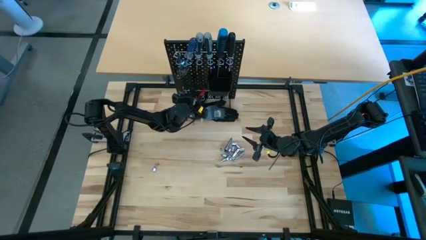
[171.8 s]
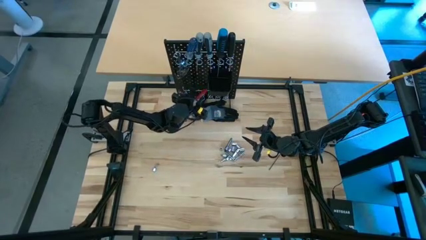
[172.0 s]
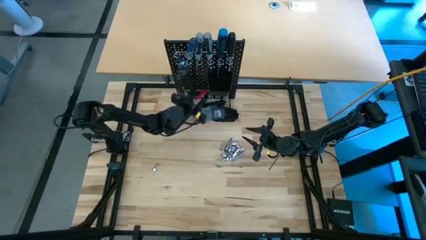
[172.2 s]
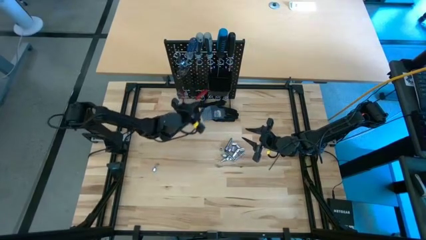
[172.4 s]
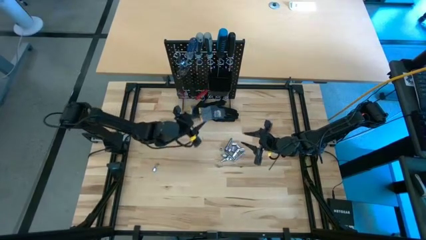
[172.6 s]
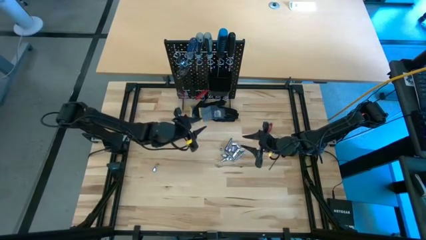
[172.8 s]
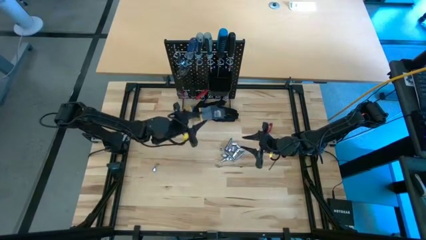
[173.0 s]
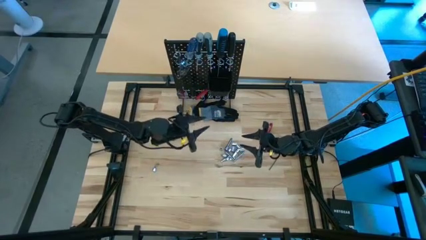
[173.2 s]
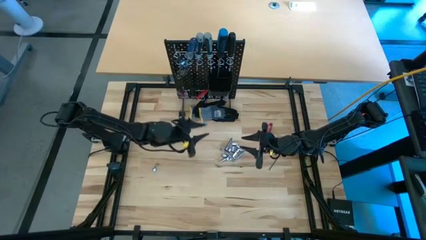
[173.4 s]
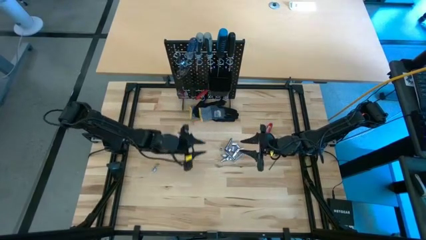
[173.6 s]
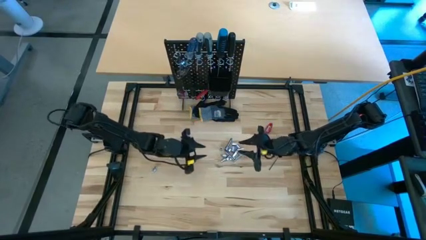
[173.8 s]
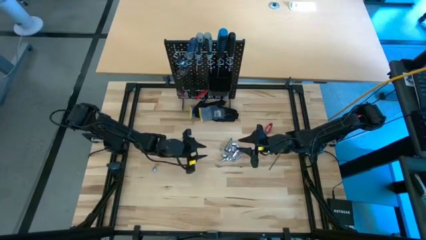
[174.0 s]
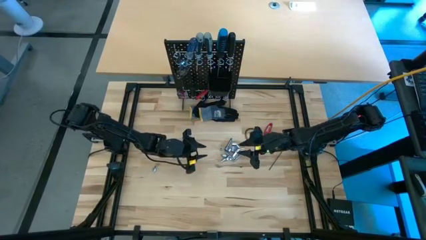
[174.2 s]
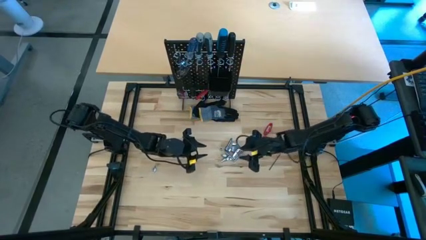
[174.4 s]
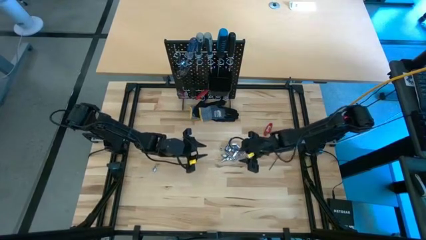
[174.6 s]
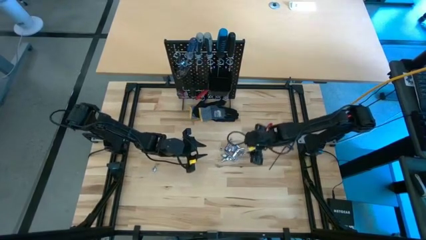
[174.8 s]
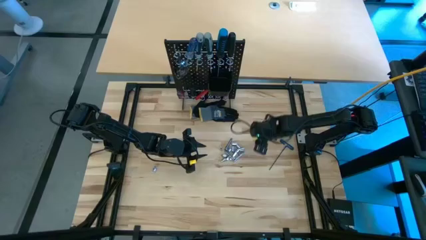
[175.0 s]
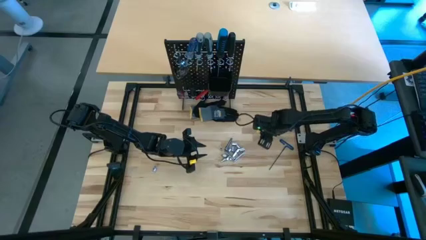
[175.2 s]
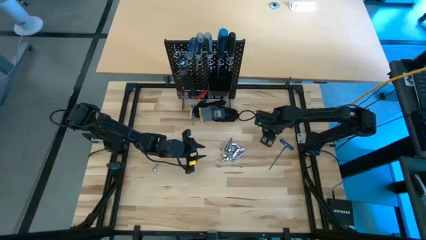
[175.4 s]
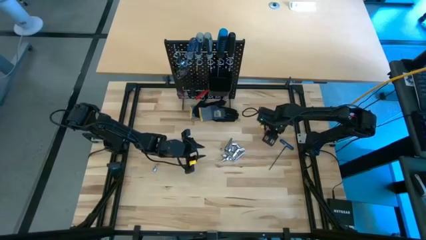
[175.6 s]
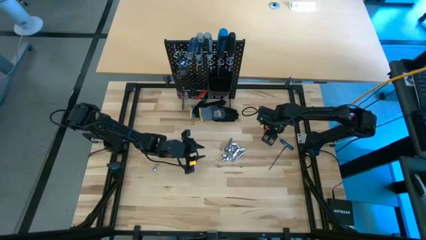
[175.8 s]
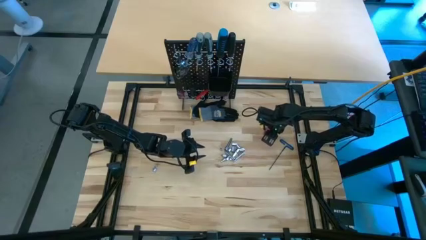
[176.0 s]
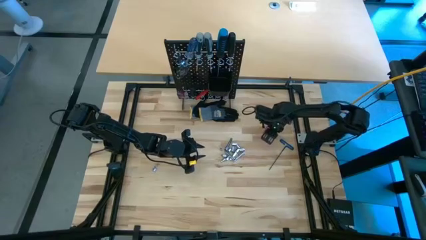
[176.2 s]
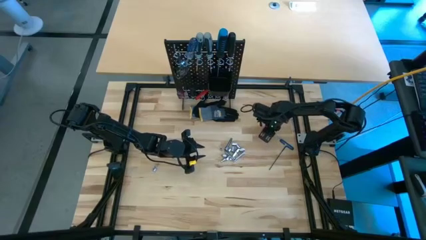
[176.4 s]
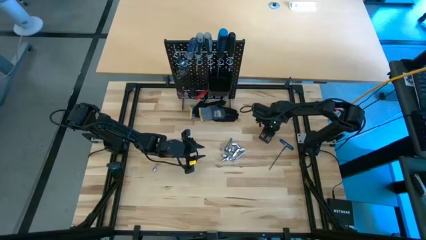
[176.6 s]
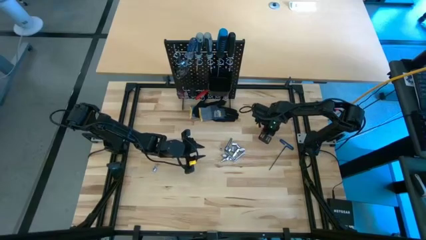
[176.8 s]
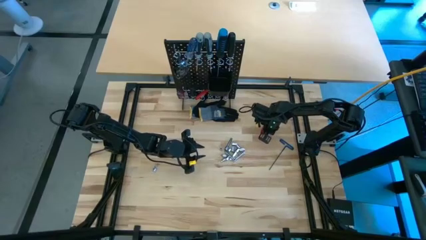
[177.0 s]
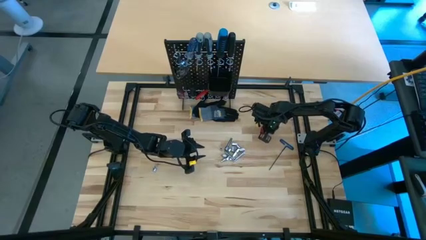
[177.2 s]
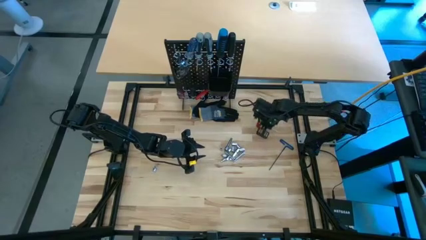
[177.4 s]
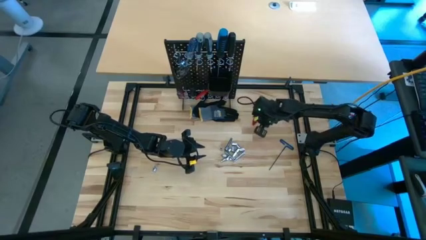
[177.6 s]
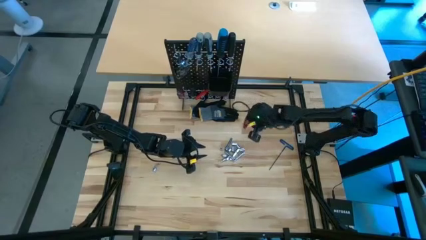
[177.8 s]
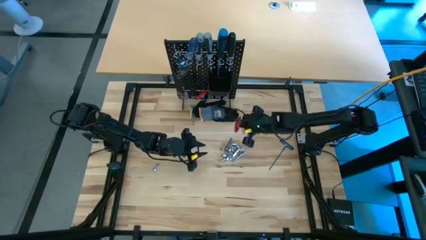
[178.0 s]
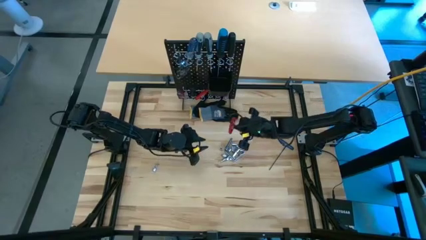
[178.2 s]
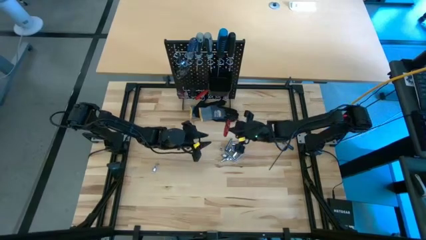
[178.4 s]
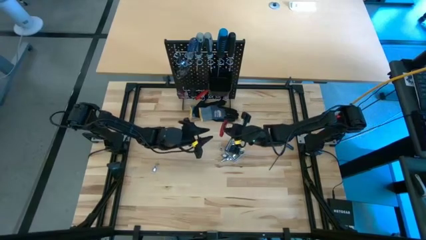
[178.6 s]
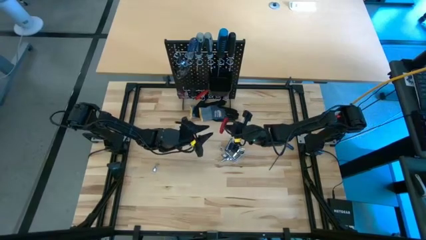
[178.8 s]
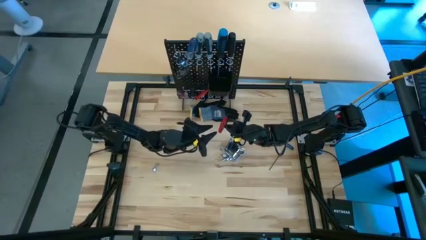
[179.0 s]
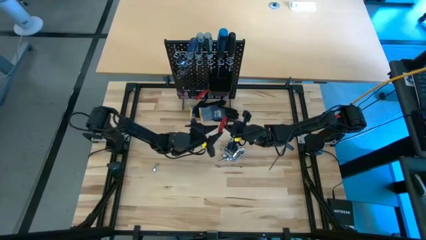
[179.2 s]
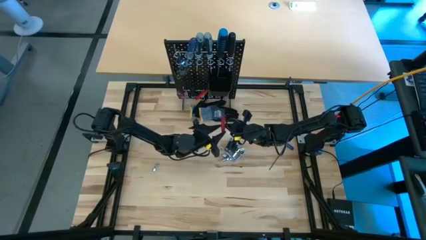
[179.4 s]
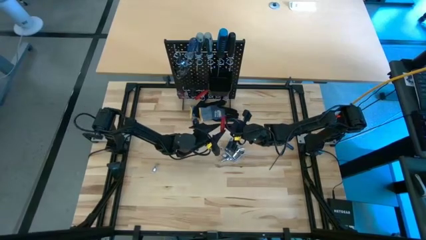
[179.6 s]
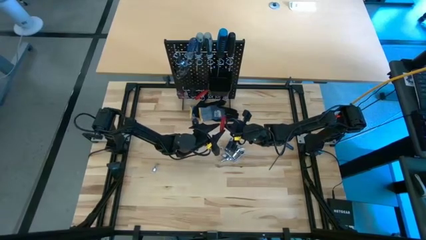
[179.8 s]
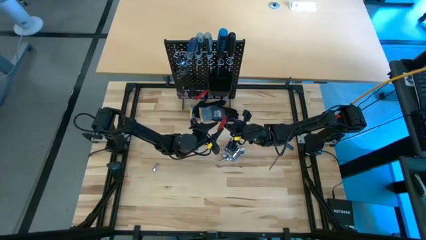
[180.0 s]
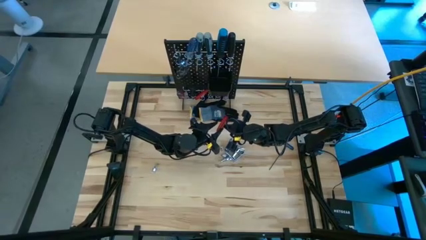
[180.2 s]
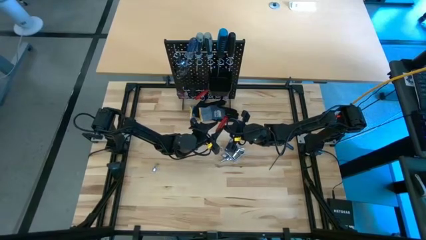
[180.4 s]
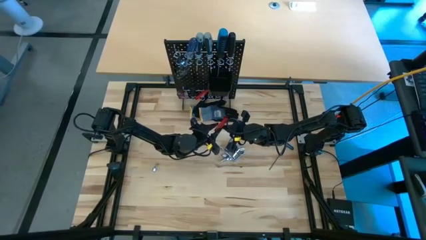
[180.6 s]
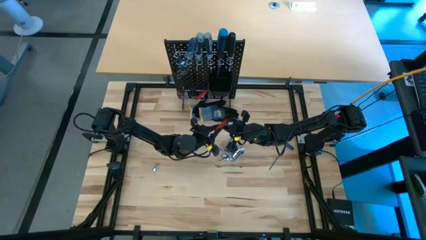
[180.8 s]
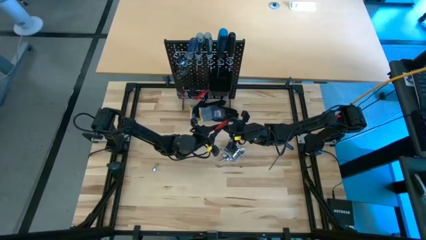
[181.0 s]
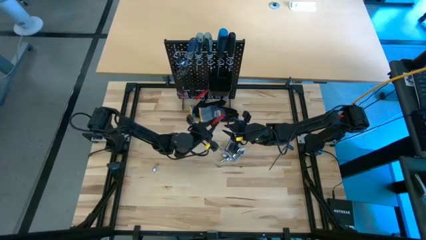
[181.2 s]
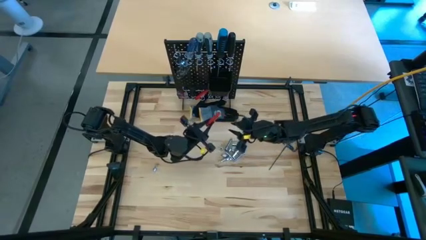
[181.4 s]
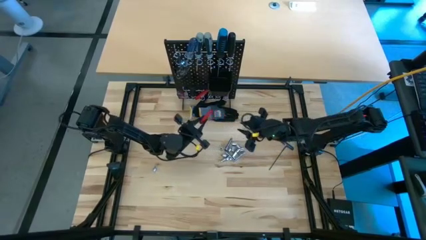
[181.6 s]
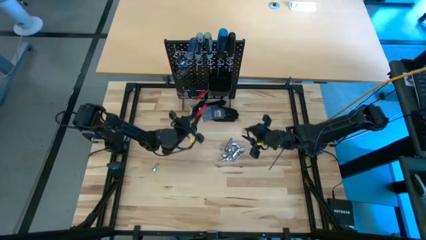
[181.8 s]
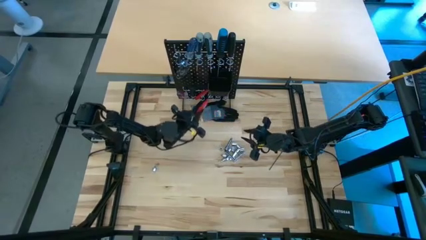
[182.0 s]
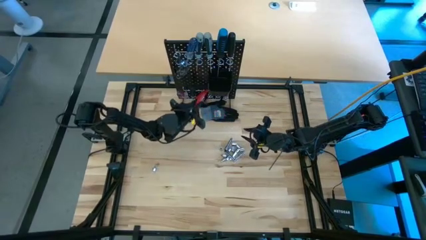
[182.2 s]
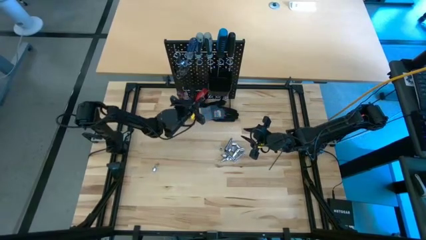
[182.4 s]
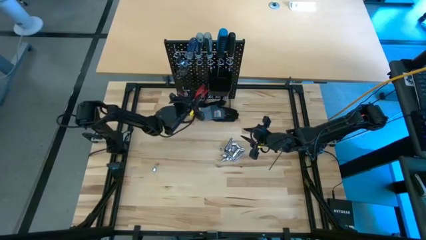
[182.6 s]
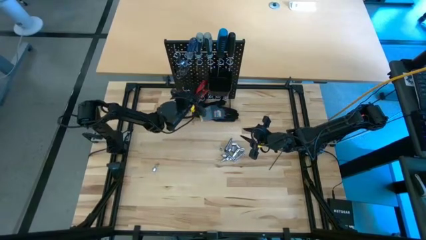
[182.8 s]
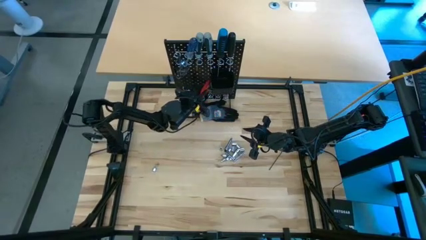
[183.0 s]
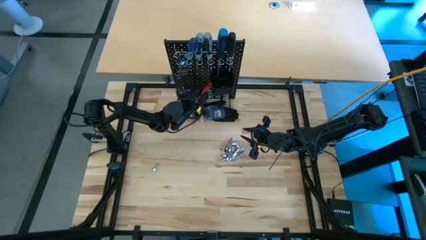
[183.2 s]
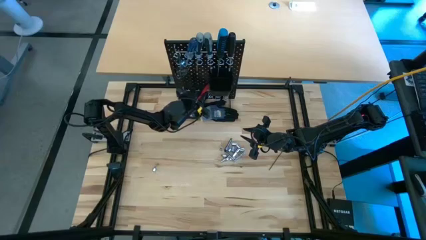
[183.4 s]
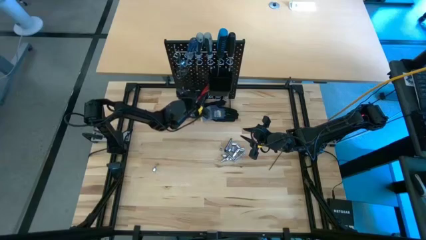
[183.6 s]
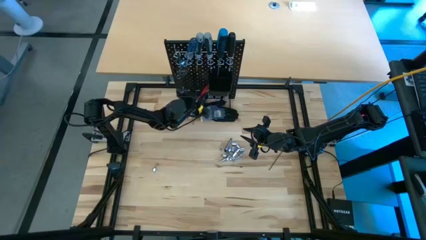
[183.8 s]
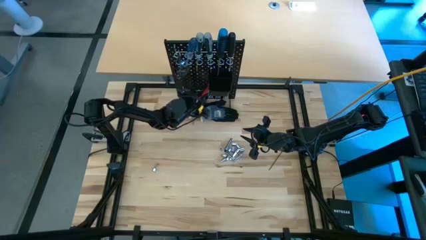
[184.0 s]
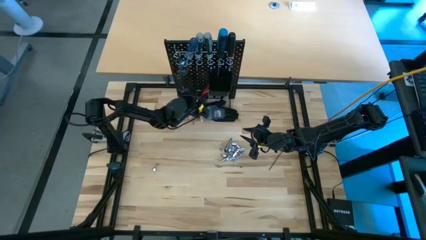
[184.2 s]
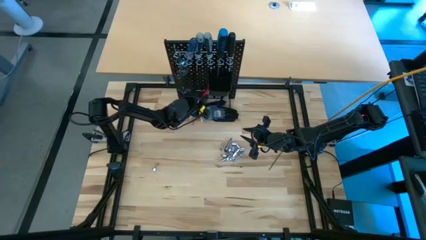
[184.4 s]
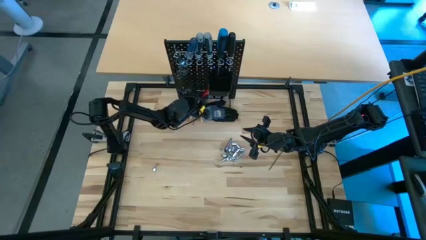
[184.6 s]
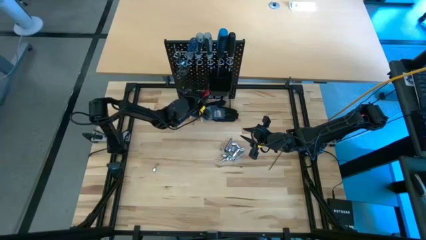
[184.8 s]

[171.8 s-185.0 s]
Task: Hang tools onto peg board
Hang the red allen wrench on the pegboard

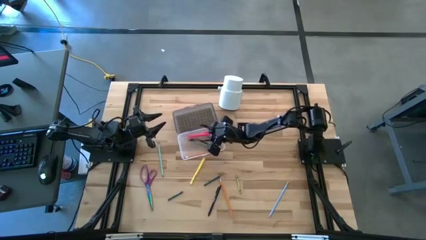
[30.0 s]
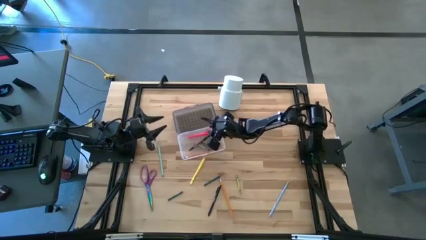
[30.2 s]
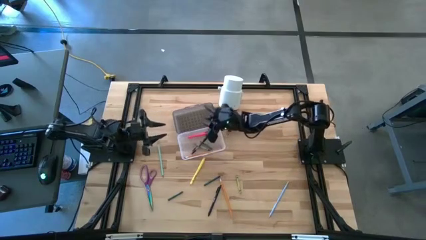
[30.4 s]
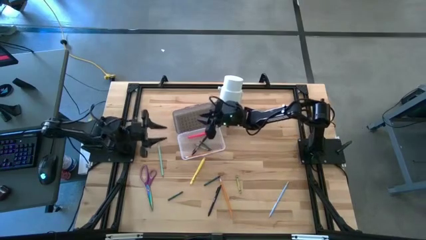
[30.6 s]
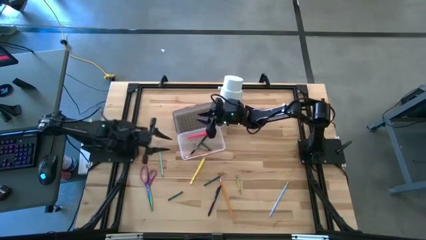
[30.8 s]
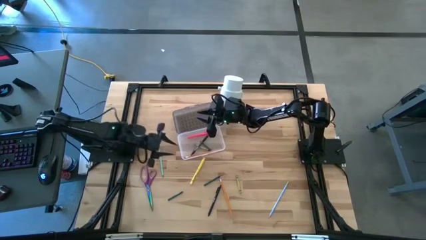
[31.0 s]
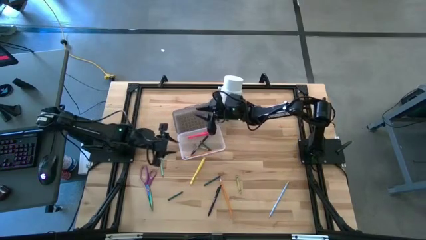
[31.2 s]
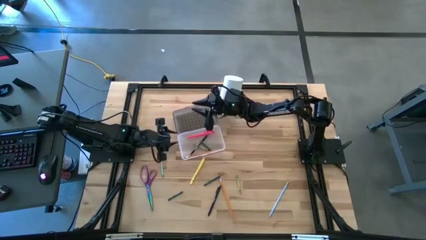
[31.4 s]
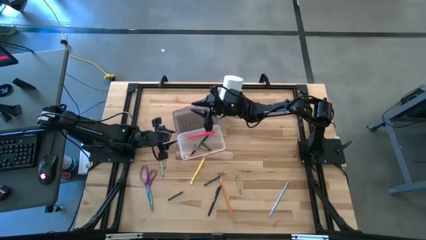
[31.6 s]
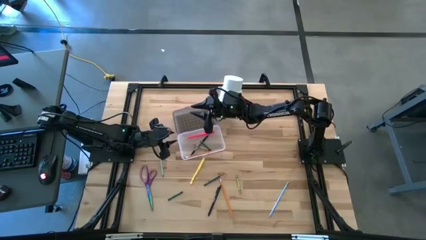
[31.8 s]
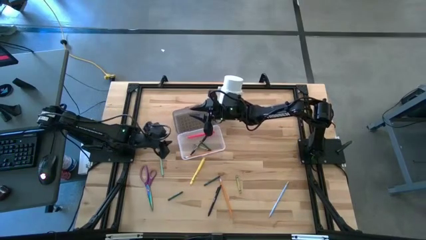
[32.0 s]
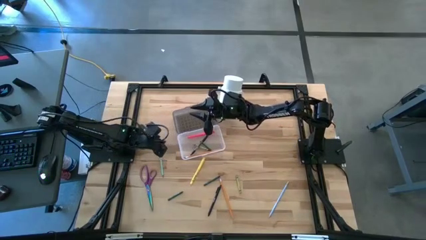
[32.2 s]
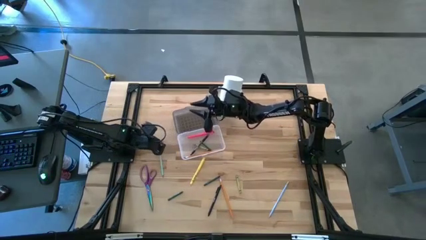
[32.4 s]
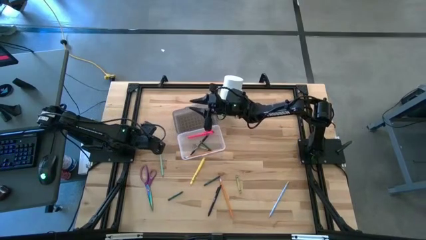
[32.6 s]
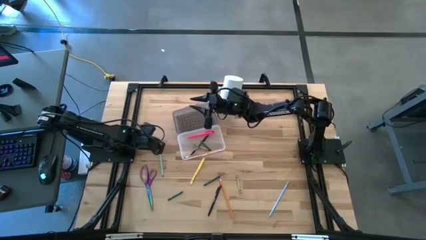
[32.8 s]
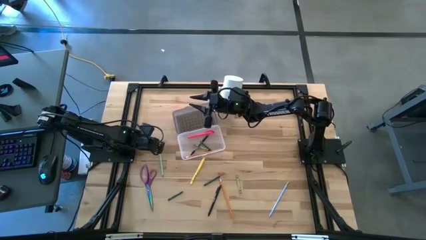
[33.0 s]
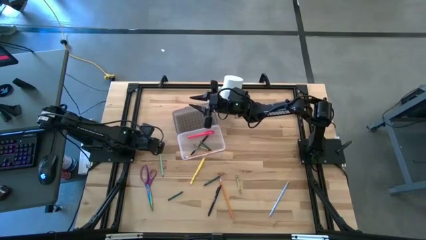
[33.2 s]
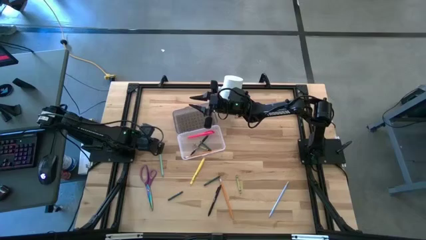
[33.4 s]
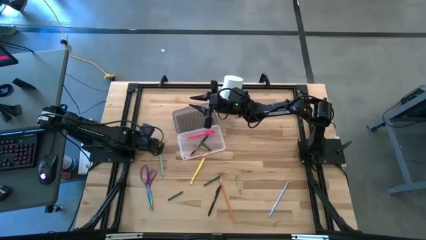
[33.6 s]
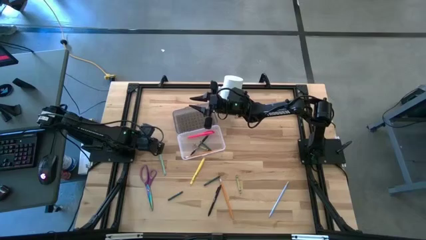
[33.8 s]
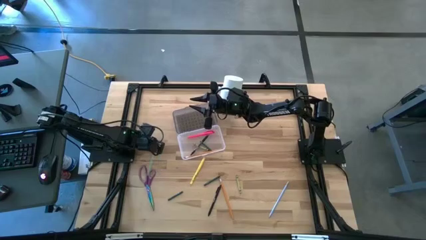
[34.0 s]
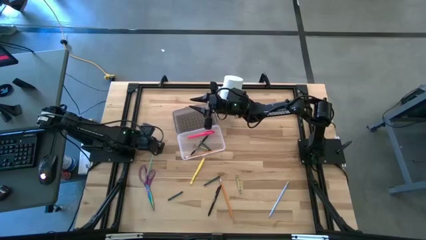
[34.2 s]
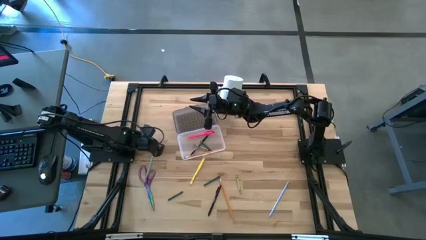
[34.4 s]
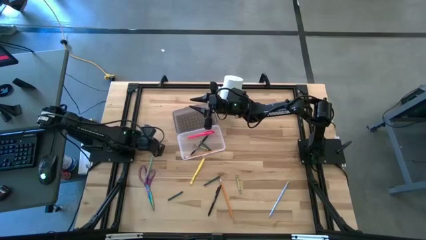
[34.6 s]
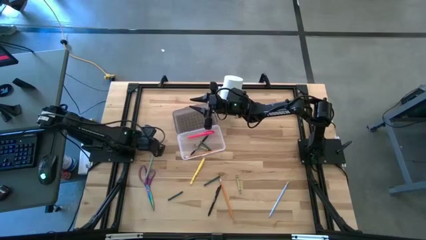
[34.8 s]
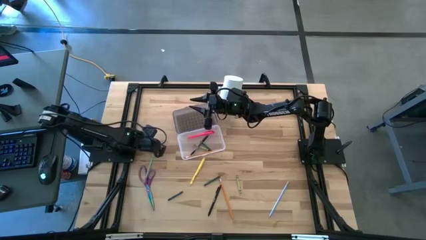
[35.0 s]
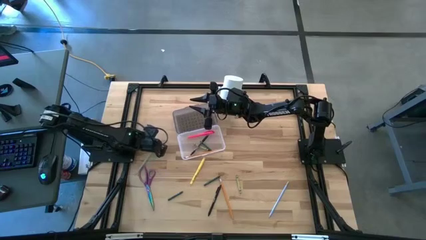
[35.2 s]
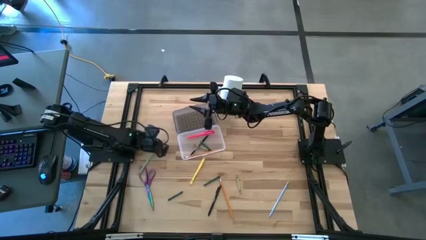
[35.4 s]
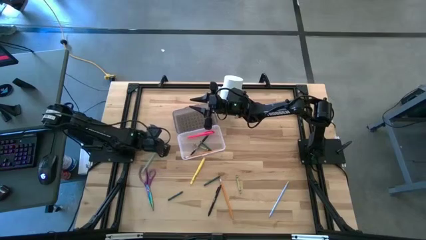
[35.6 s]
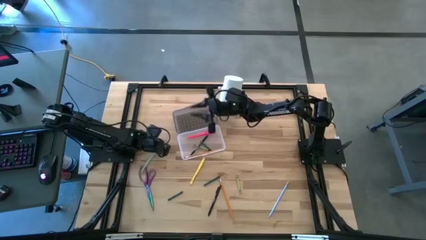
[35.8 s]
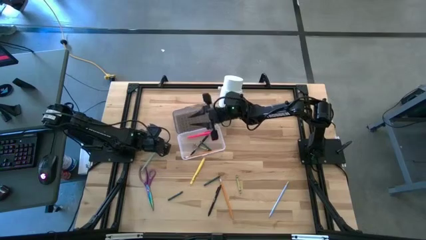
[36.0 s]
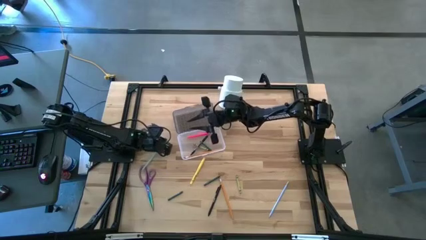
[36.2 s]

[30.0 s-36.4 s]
Task: Pick & place school supplies into a supply box
Put the left light blue colored pencil into the black supply box
